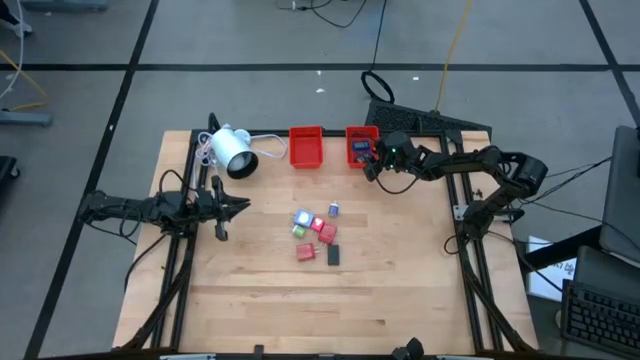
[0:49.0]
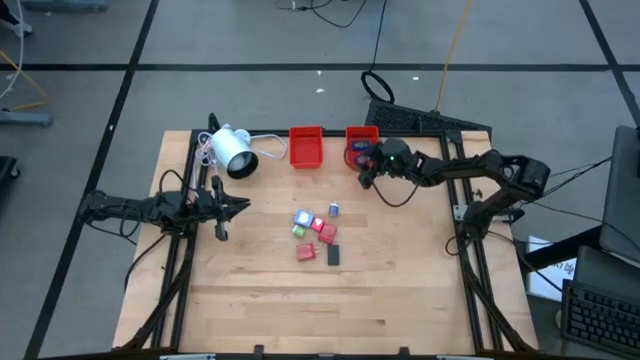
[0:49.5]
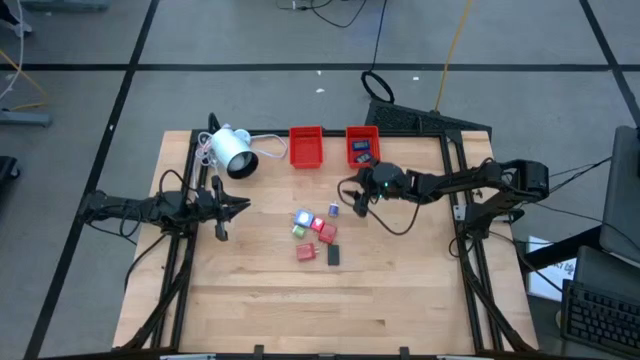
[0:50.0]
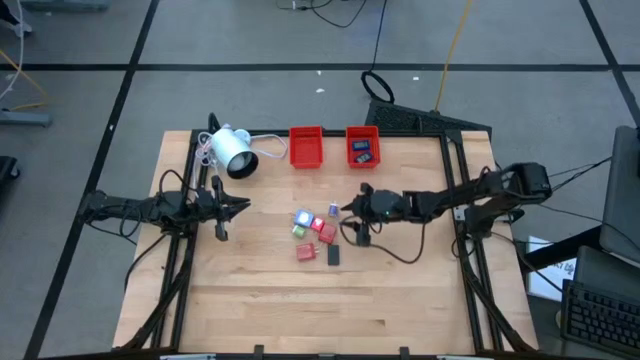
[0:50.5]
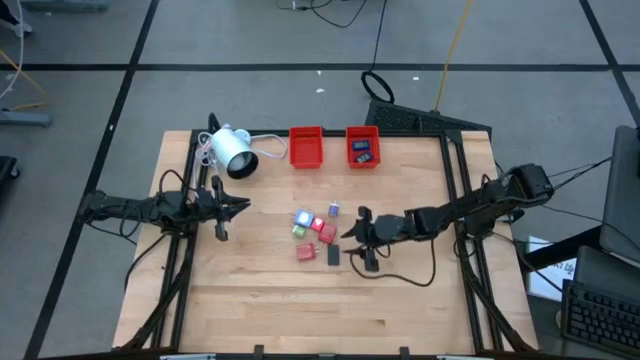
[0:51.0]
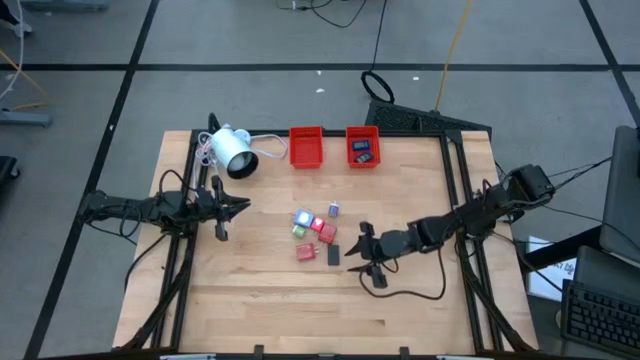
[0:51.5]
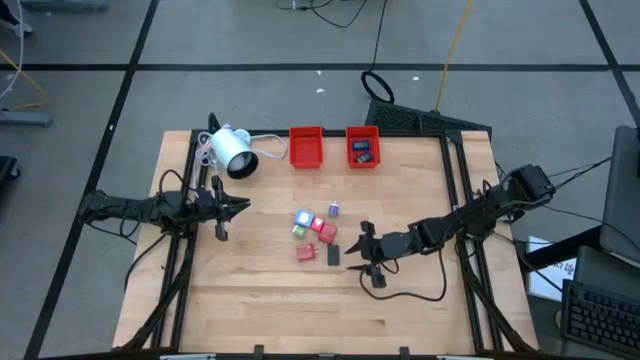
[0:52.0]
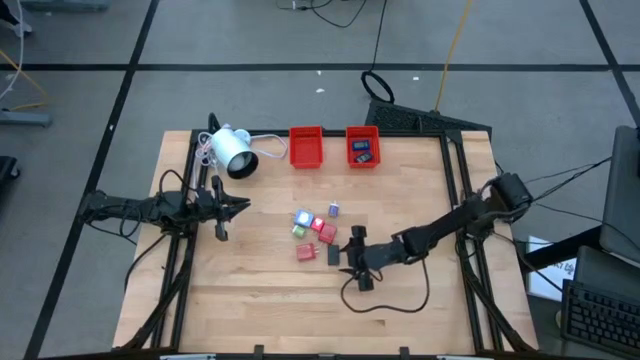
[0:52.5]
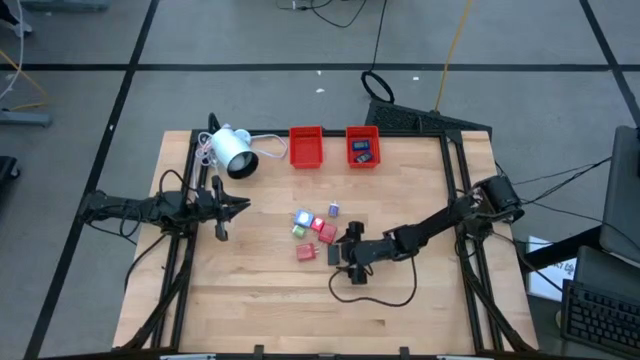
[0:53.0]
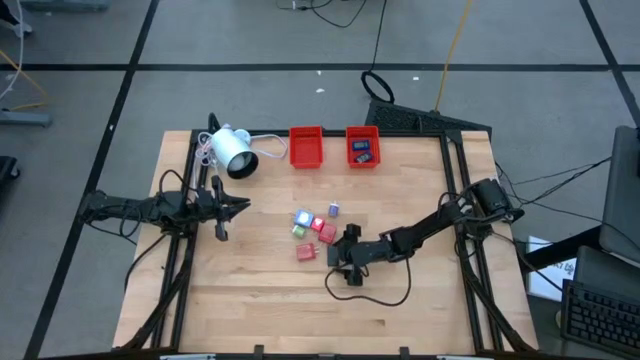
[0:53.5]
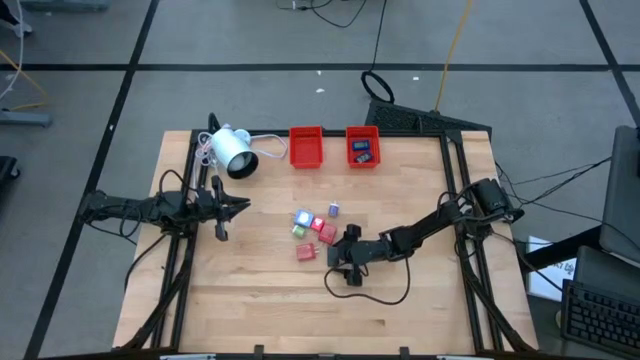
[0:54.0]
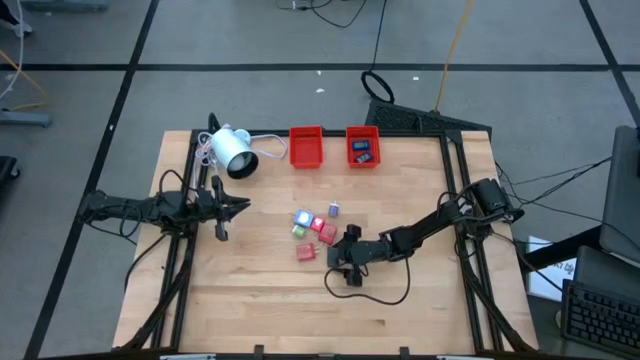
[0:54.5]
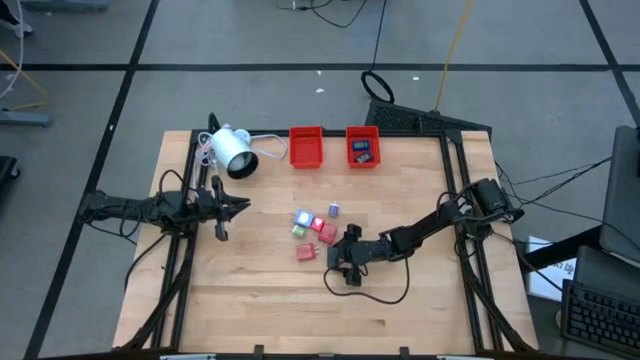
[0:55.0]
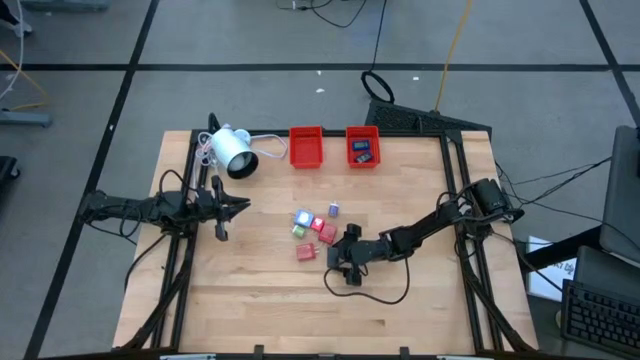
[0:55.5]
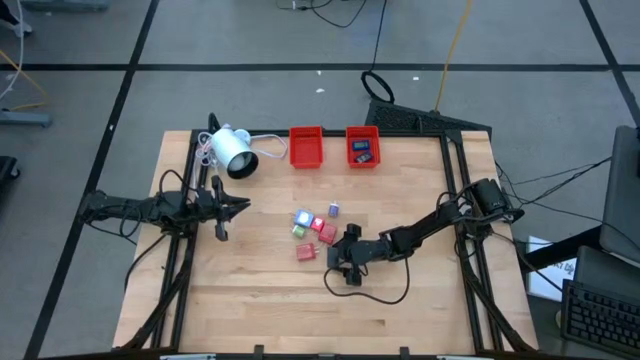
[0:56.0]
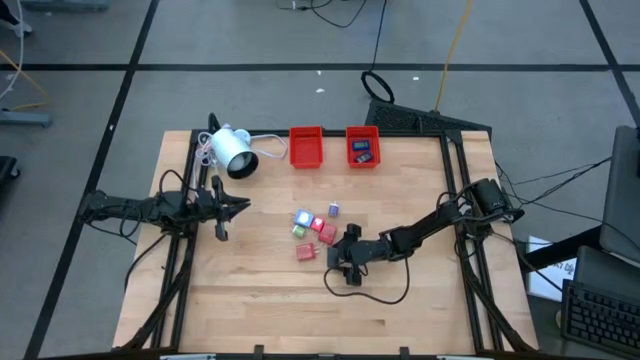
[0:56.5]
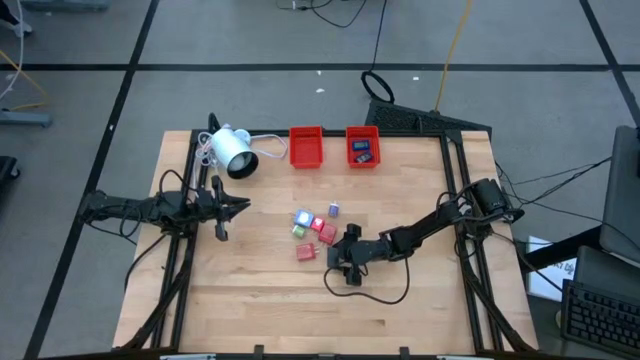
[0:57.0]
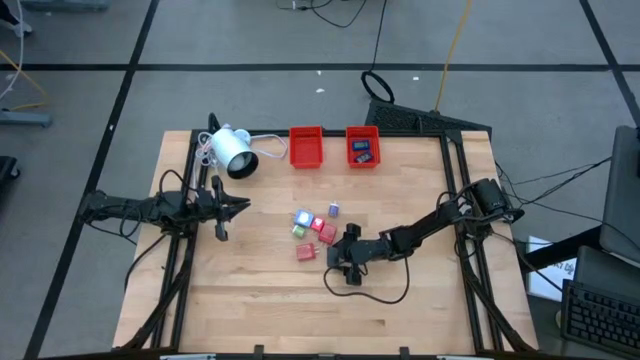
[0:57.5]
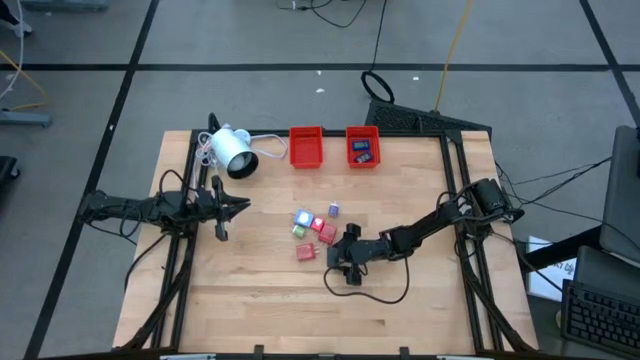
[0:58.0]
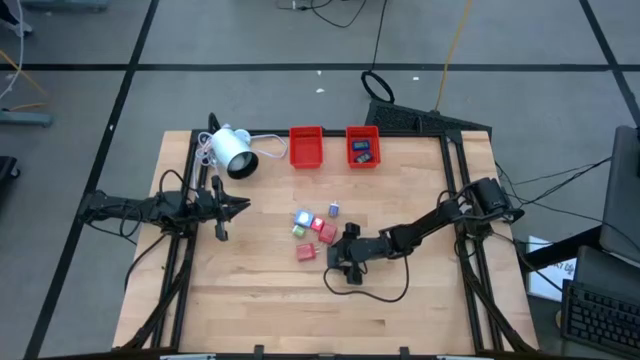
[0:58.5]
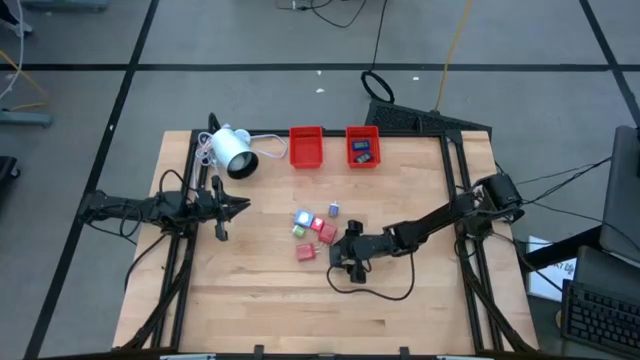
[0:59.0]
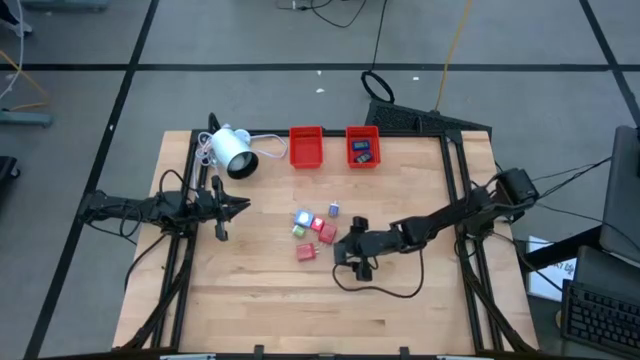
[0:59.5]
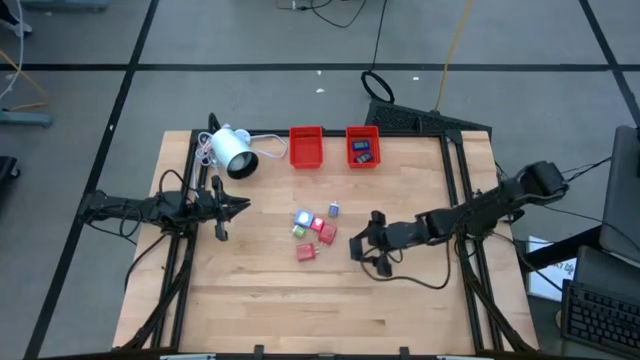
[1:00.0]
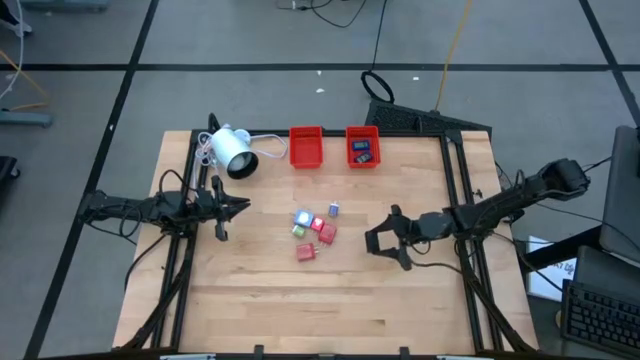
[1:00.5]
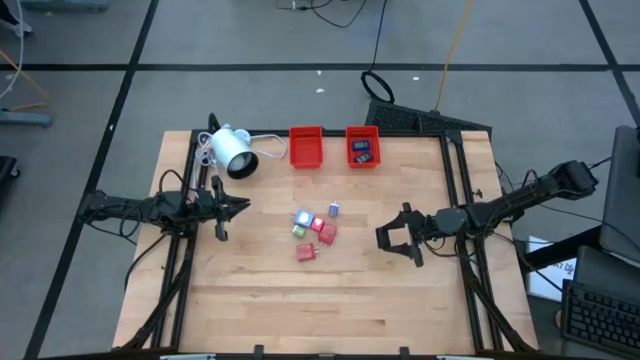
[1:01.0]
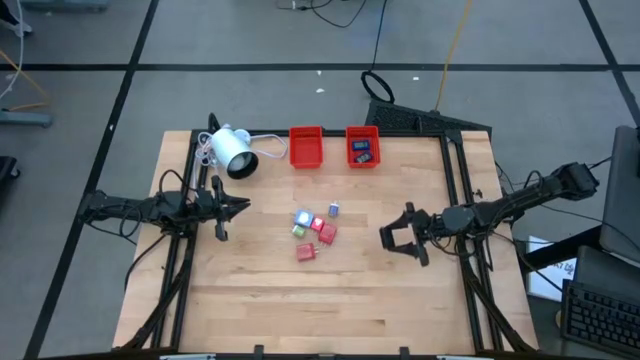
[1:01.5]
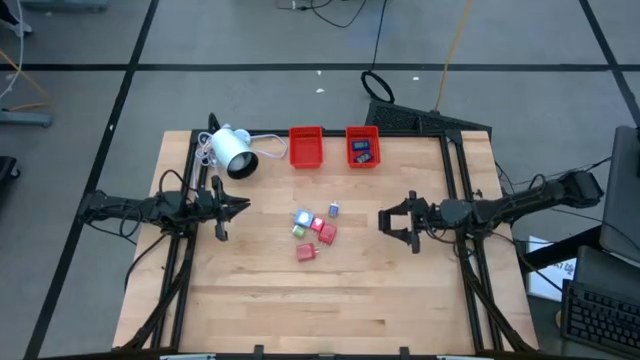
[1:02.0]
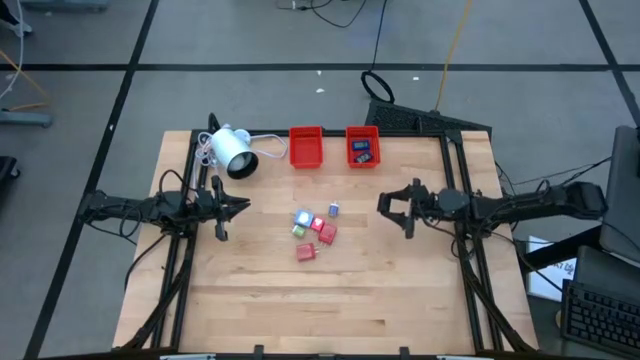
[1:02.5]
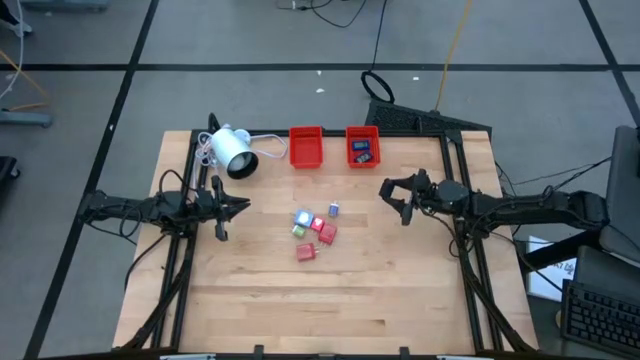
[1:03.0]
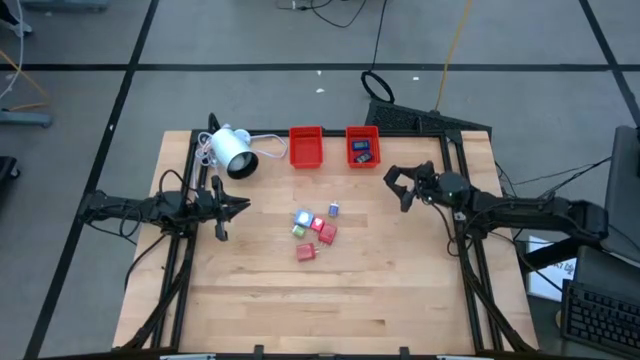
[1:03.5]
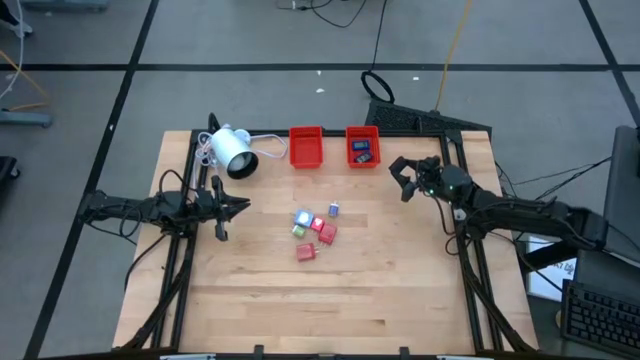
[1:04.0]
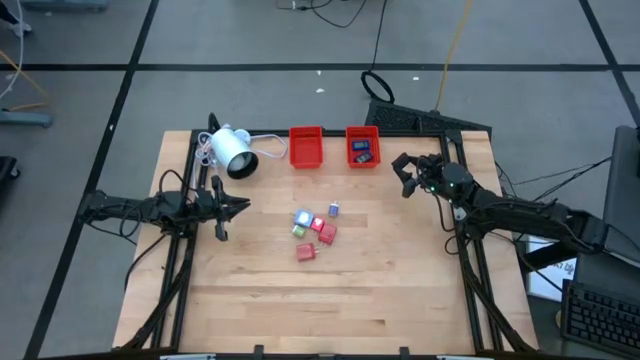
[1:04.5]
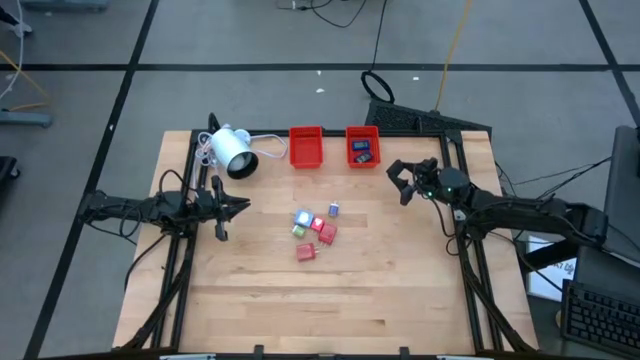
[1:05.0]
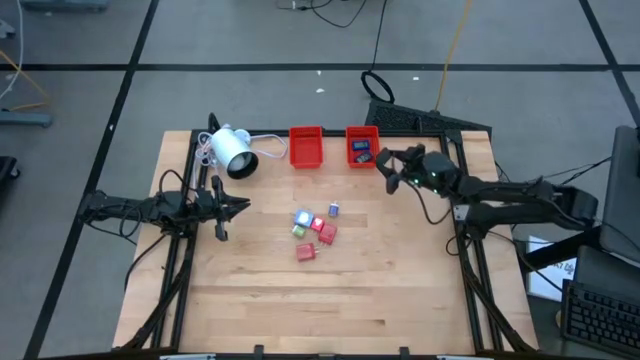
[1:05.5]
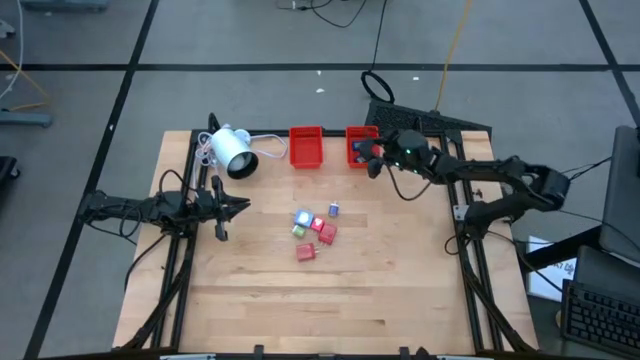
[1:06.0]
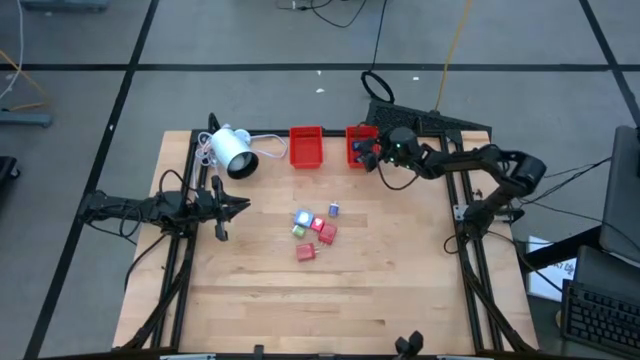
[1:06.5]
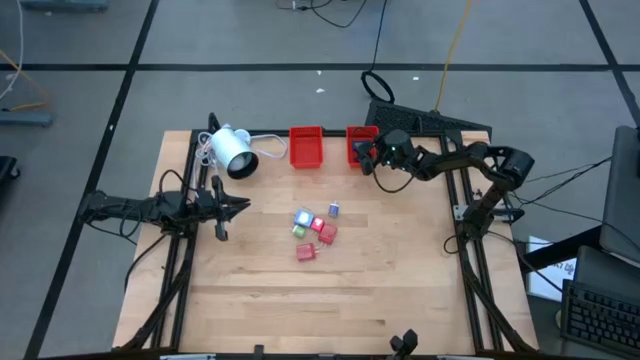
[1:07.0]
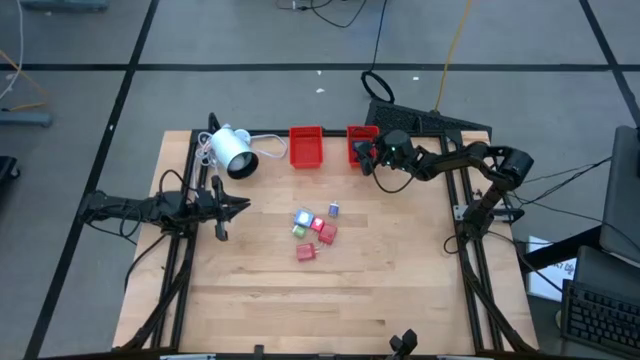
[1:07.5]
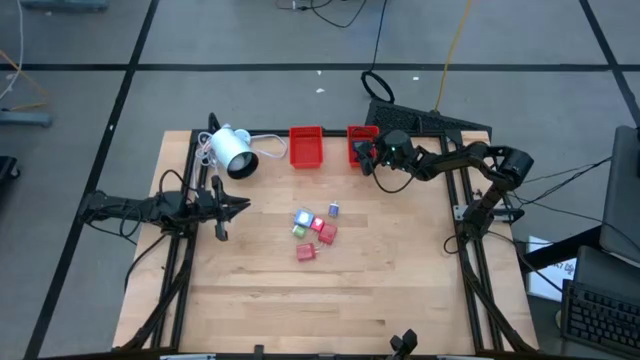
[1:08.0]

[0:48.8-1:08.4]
Task: Pick & Place Office items
Put the black digital clock into the right red bin

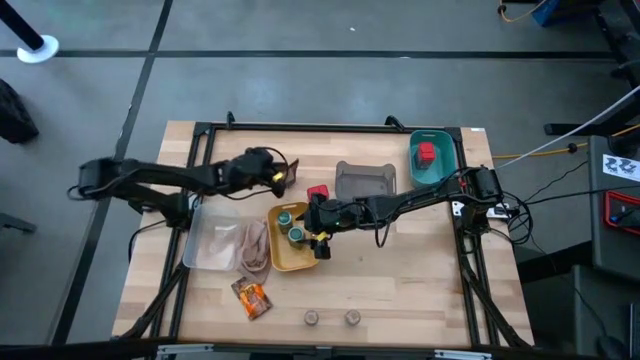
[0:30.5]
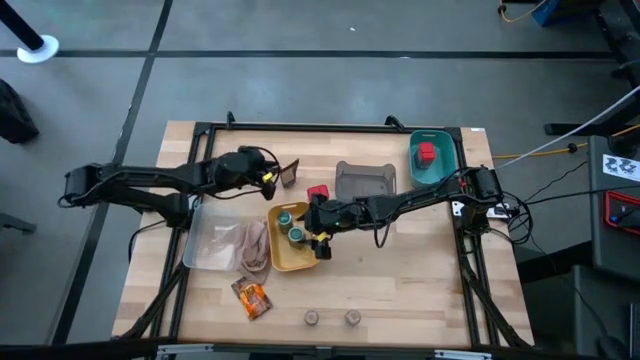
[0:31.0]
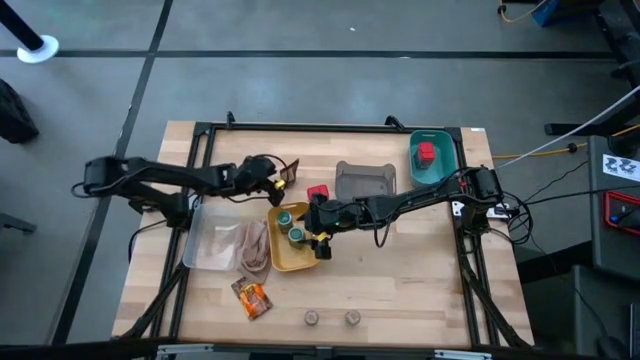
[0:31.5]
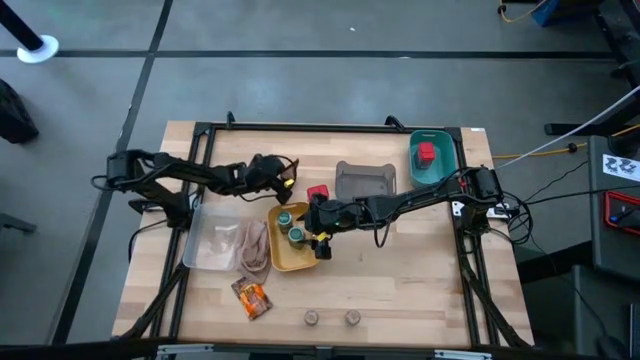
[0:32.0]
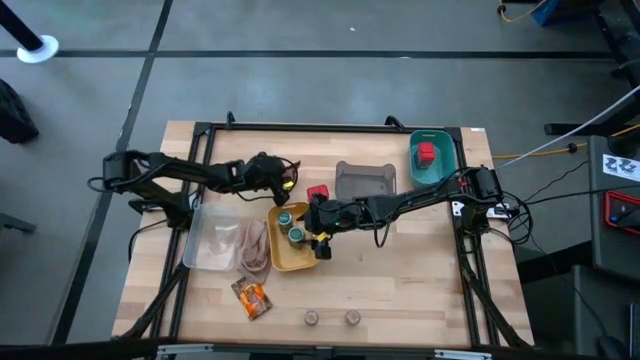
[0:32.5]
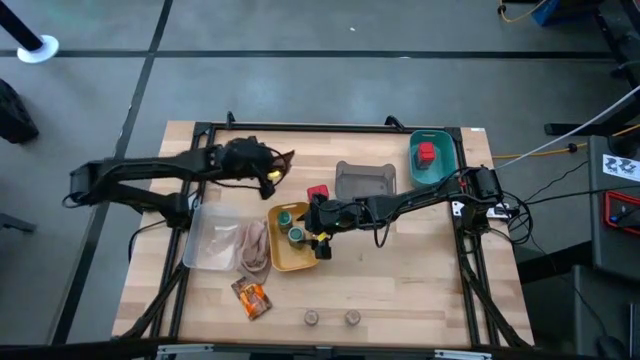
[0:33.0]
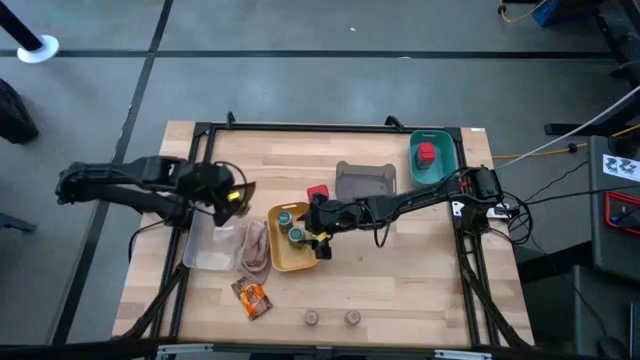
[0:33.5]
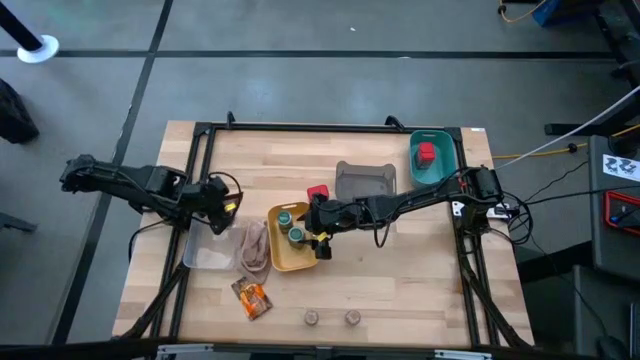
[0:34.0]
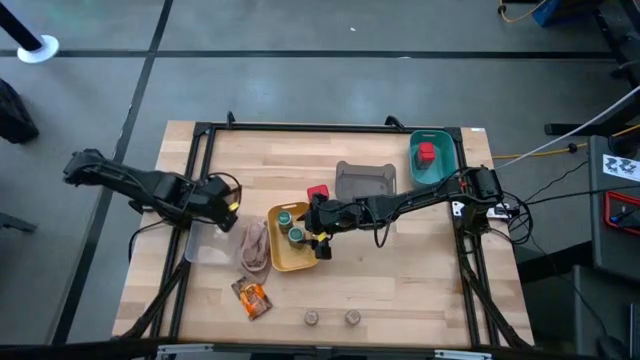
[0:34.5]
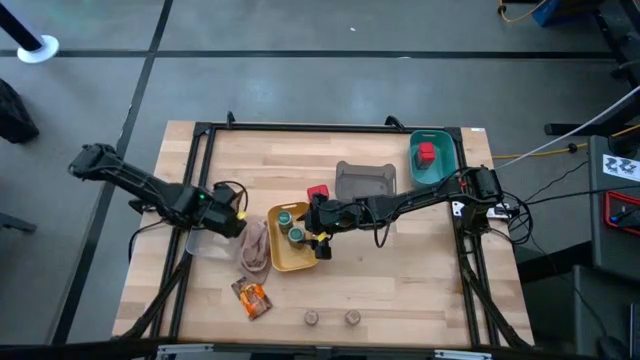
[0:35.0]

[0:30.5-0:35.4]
Task: Sort spices by type
Put the top orange seasoning bag into the transparent bin
